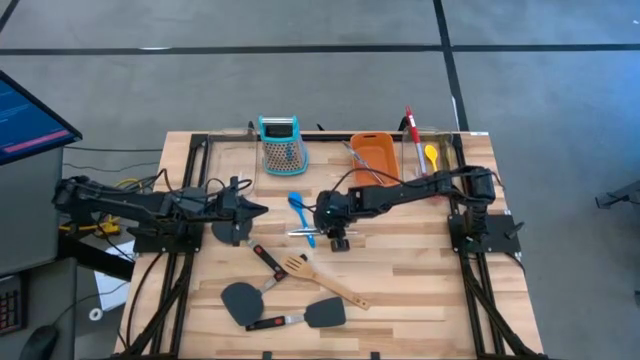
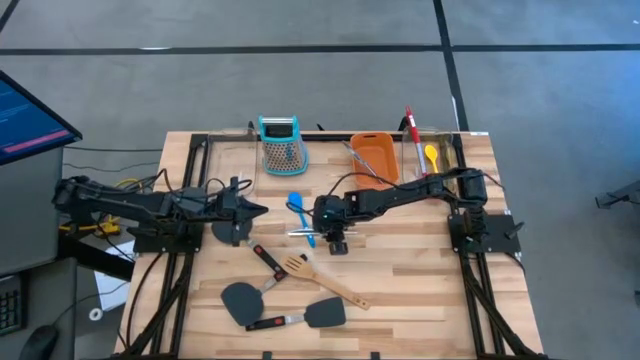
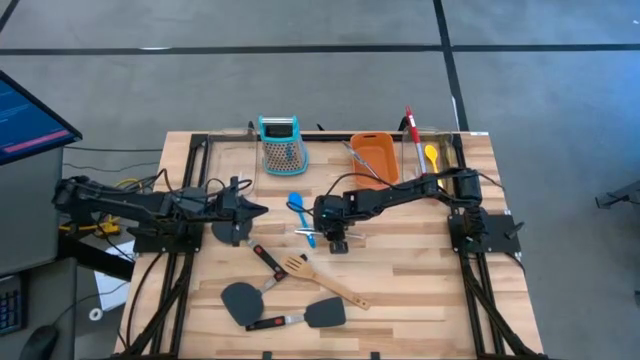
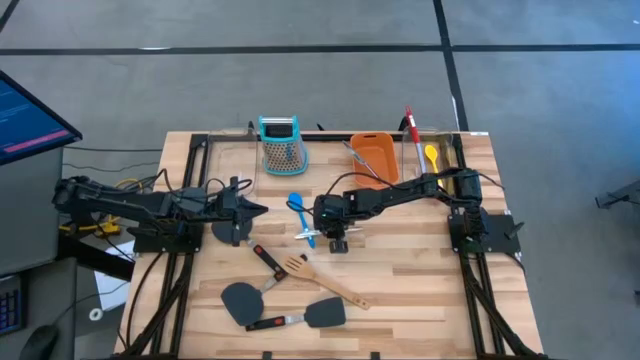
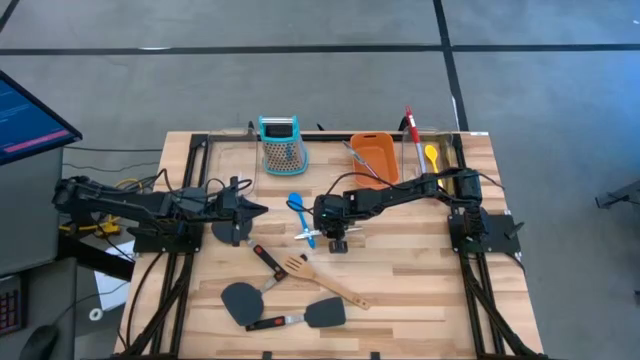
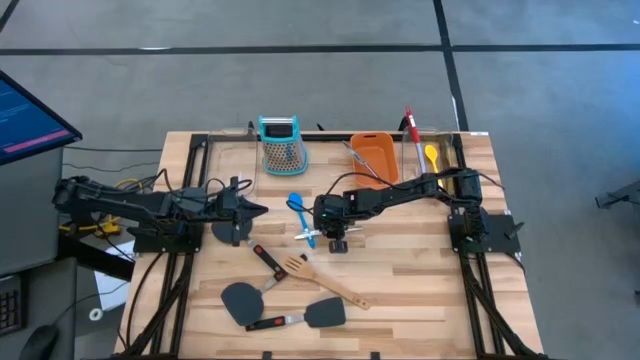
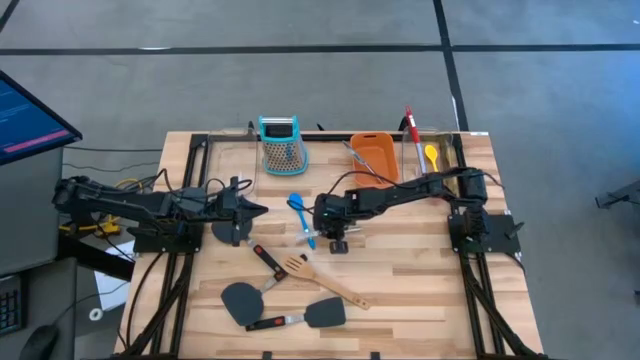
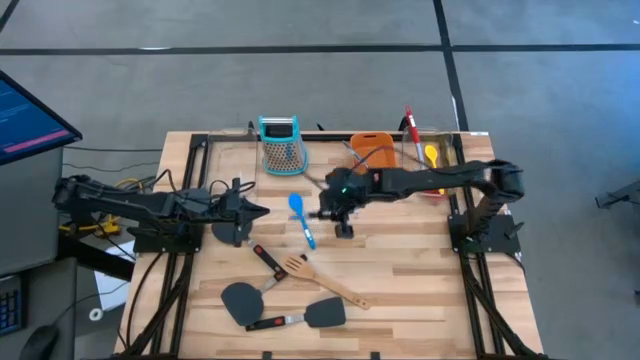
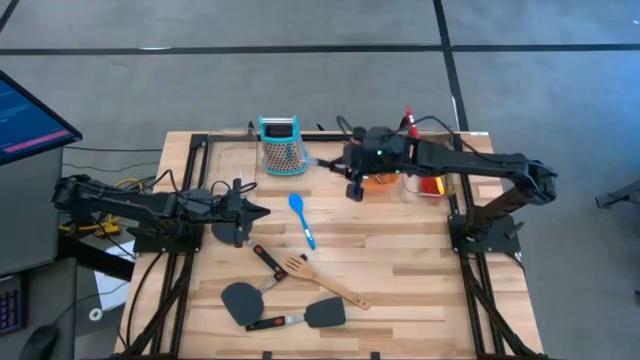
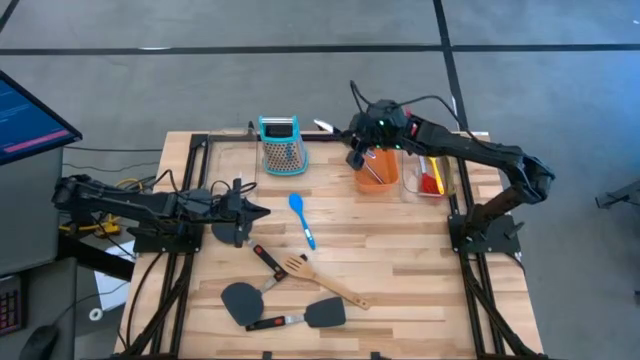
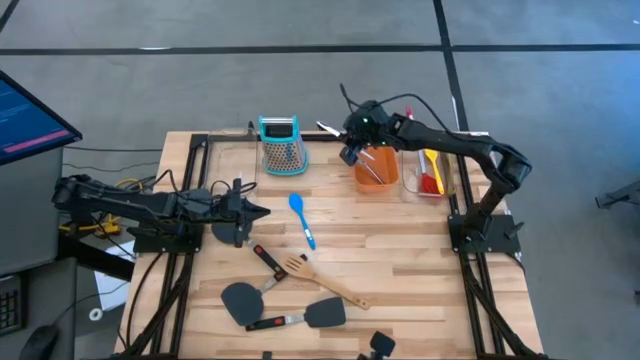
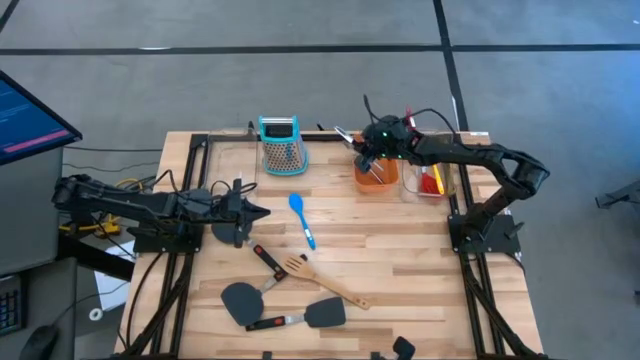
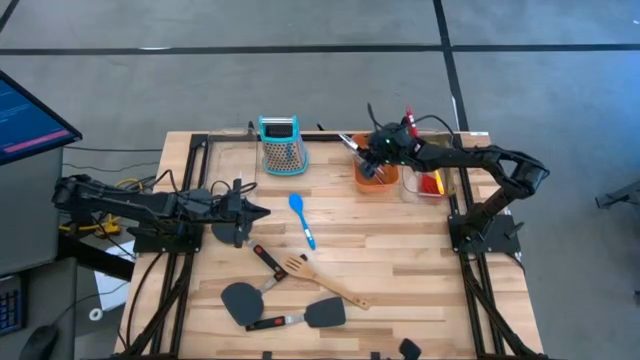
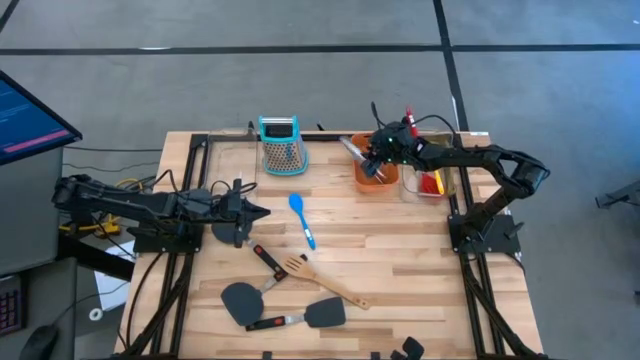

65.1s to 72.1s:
Task: Pick & Place Kitchen Items
Put the silver kitchen knife into the orange bin

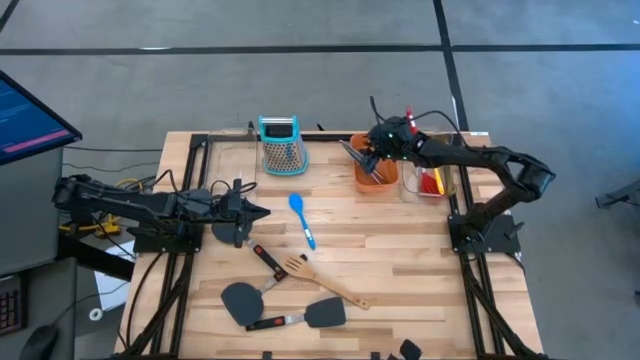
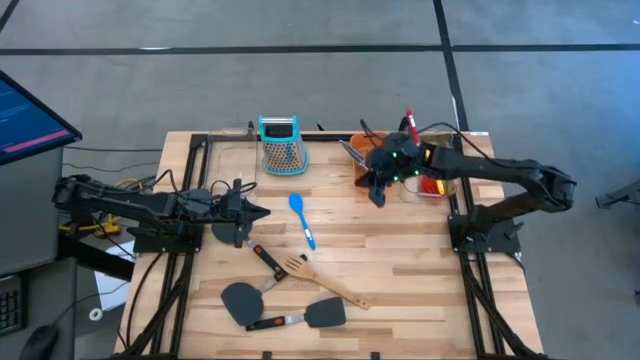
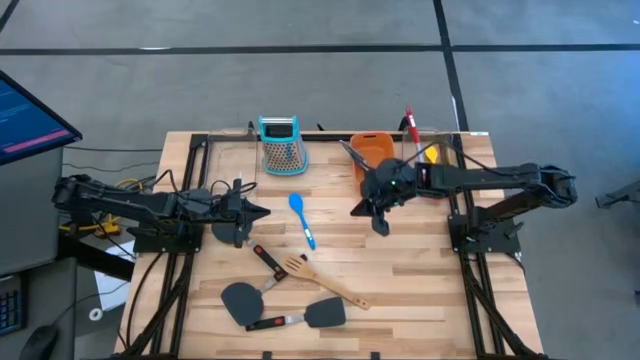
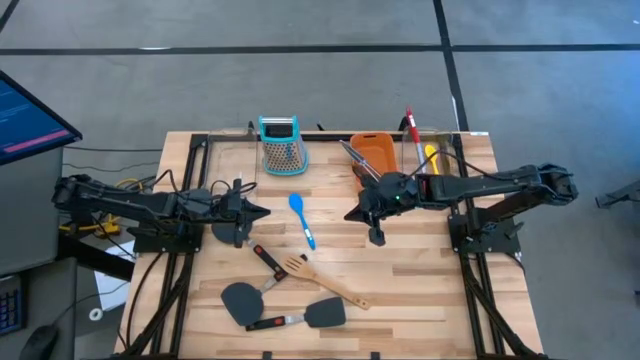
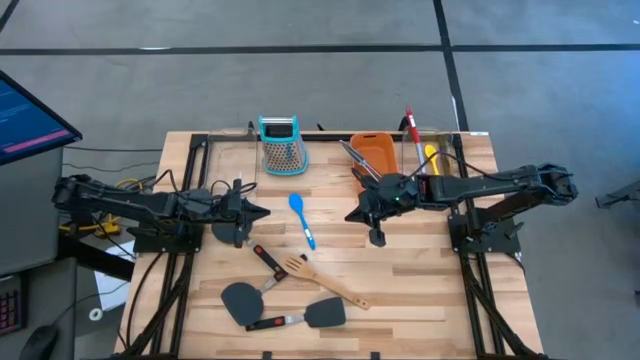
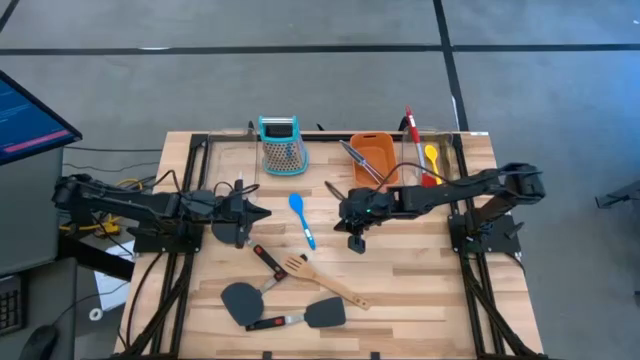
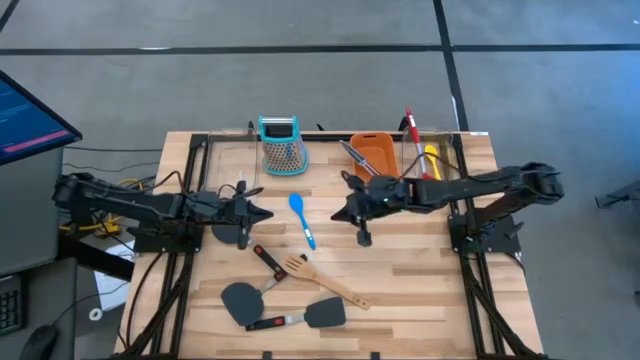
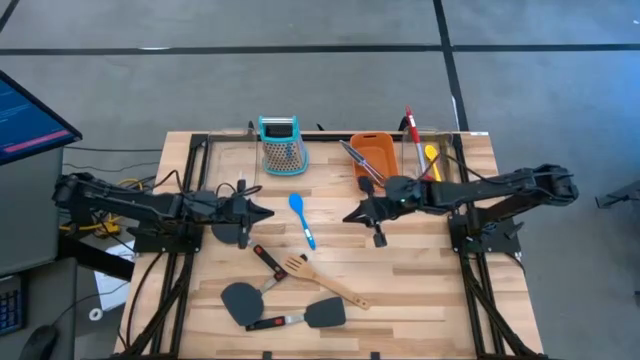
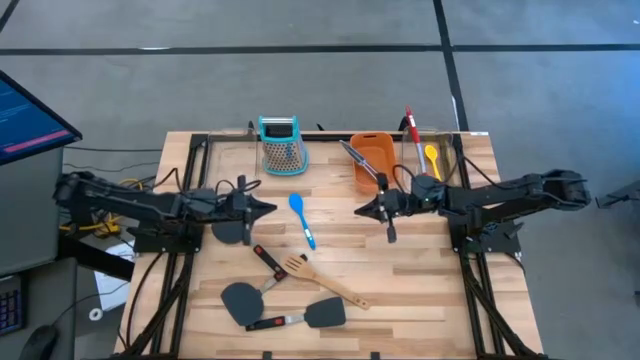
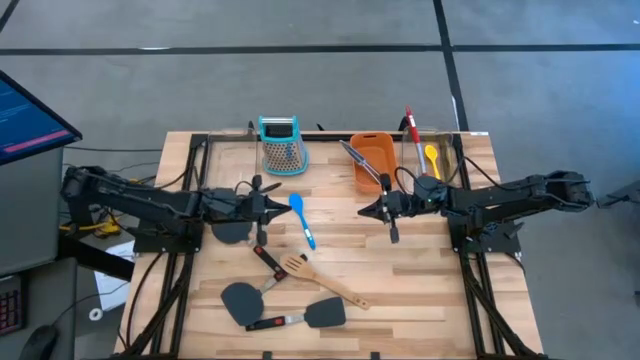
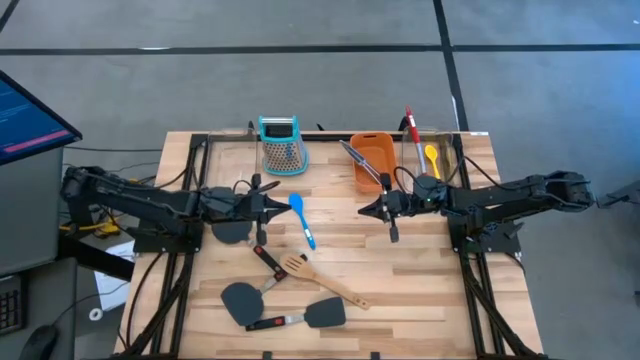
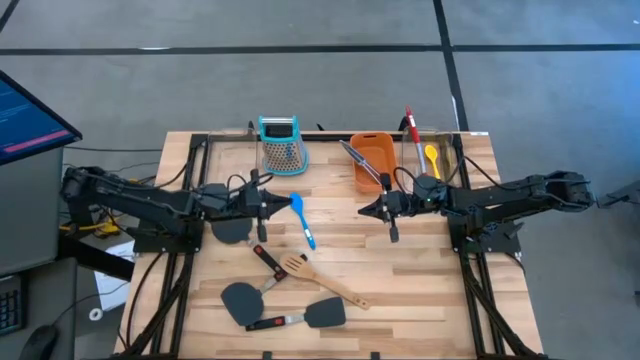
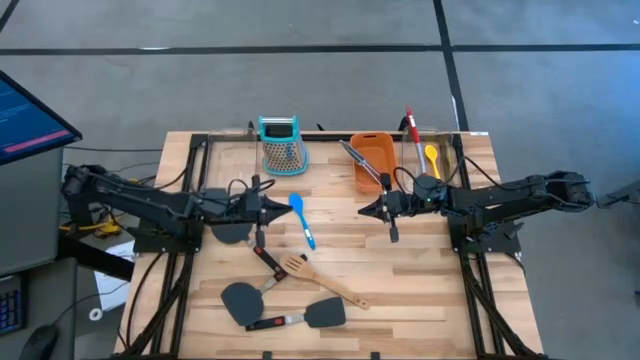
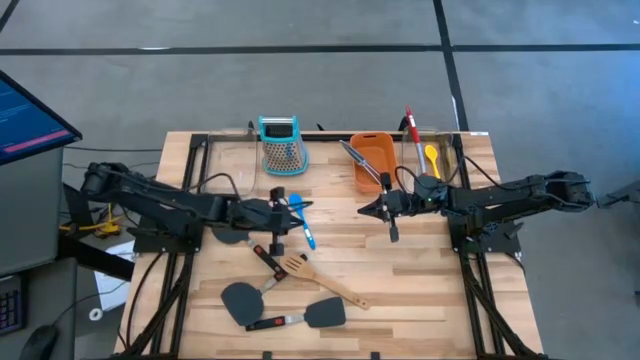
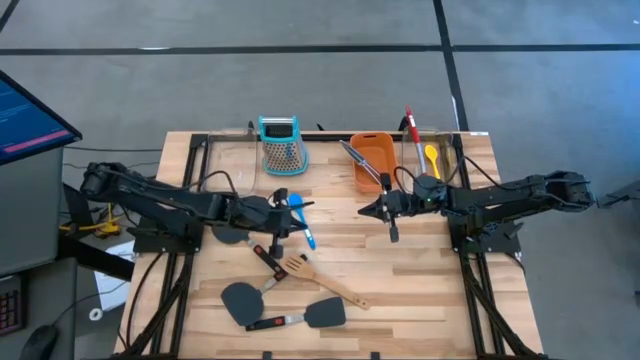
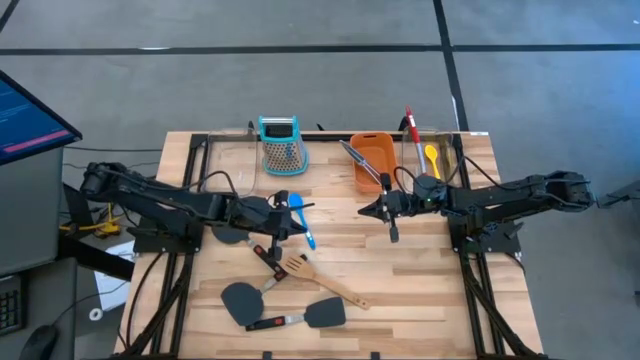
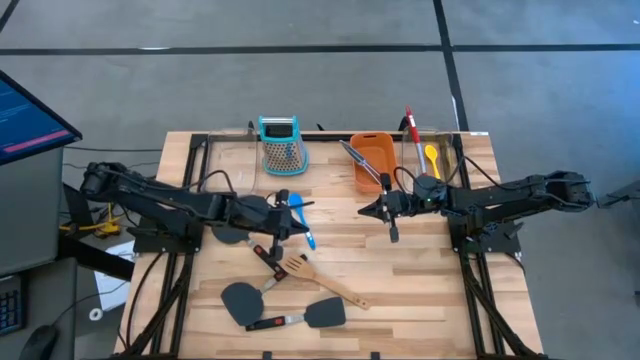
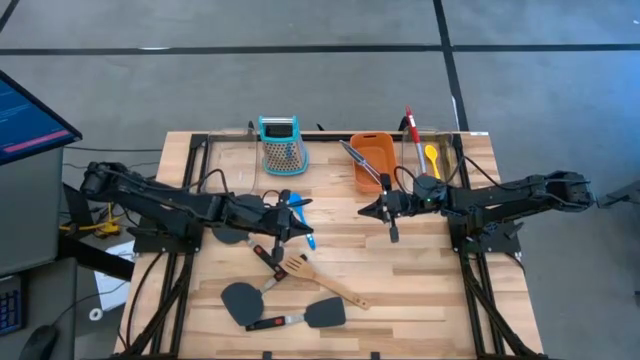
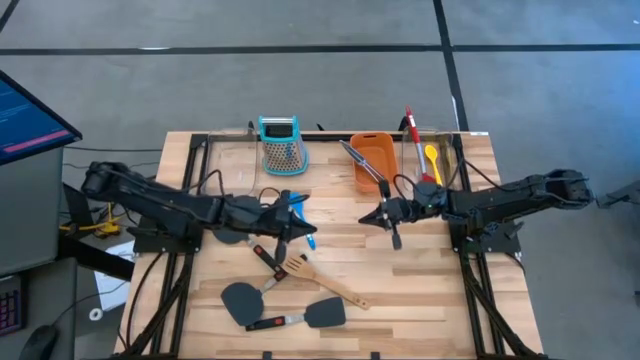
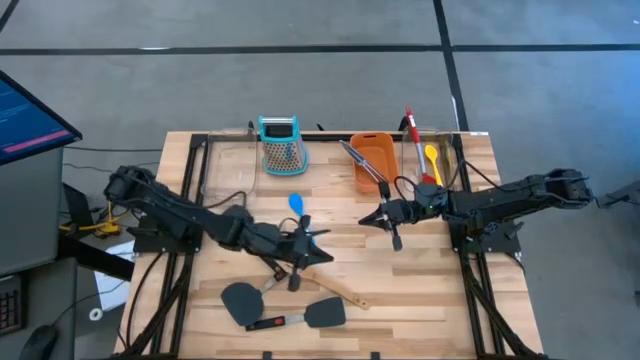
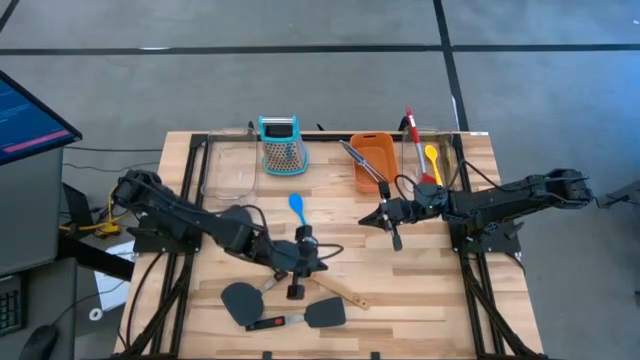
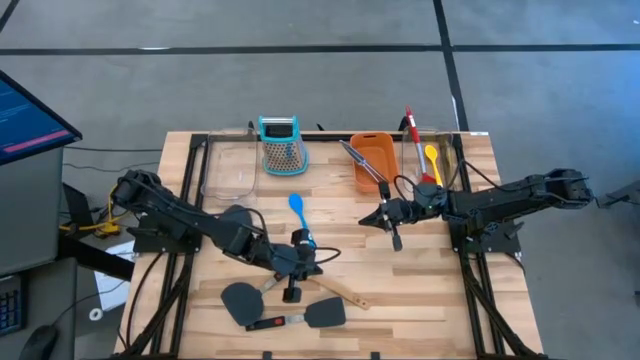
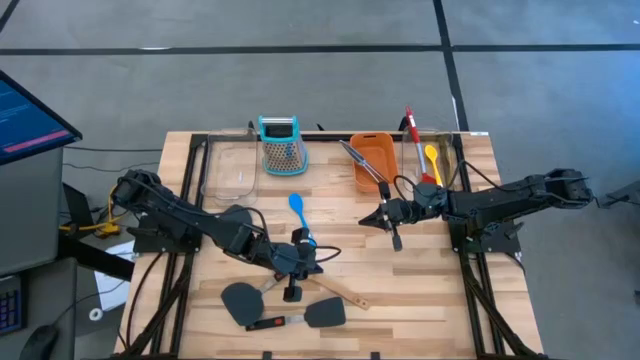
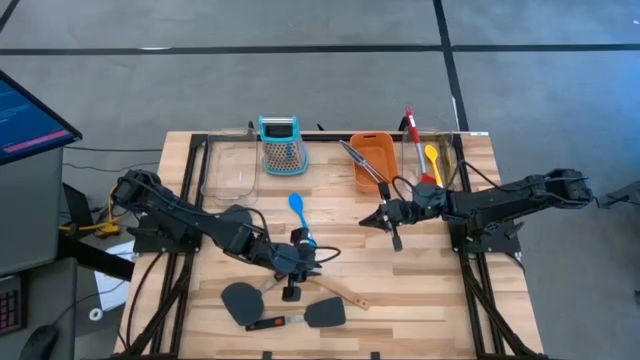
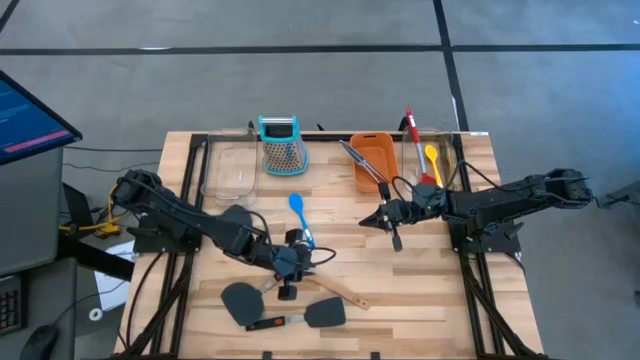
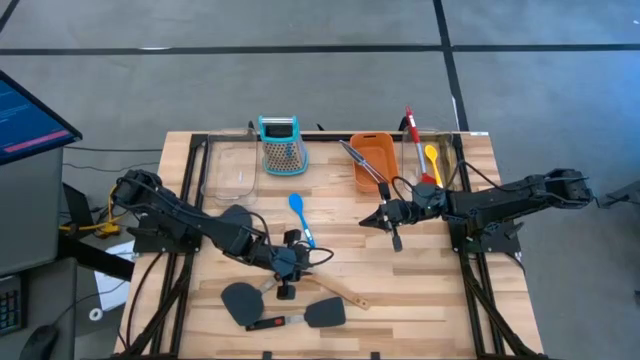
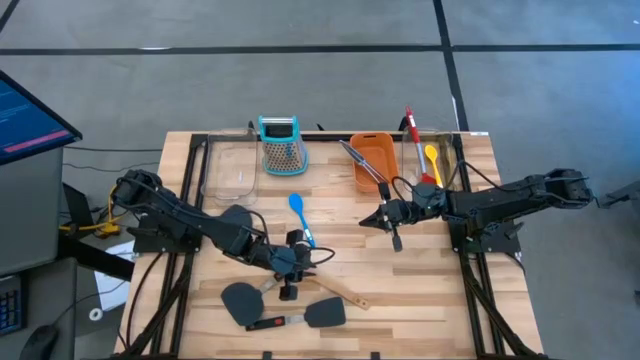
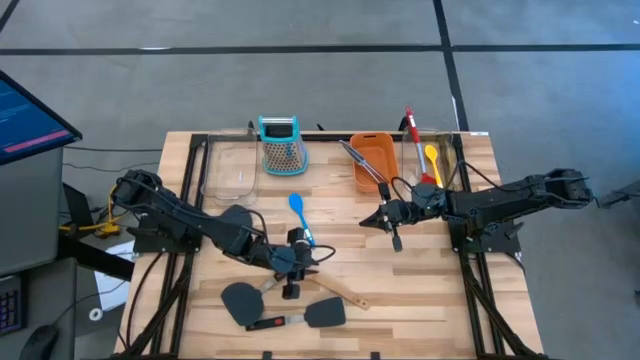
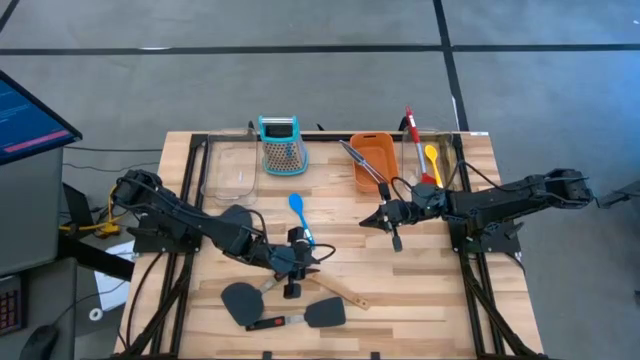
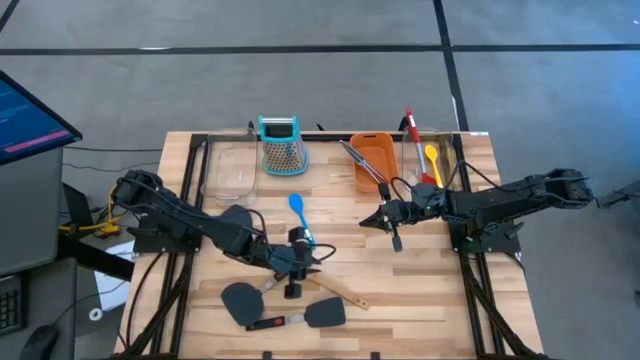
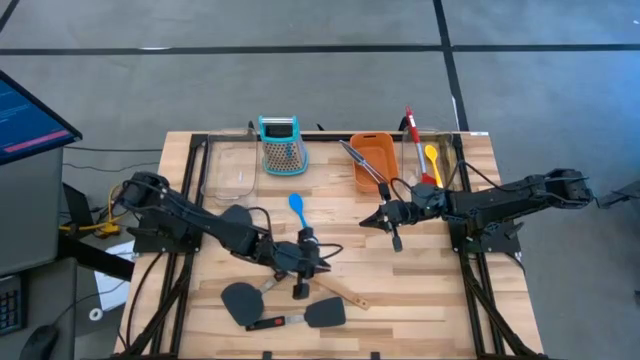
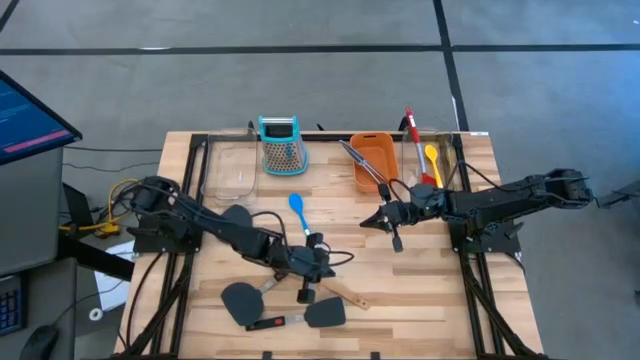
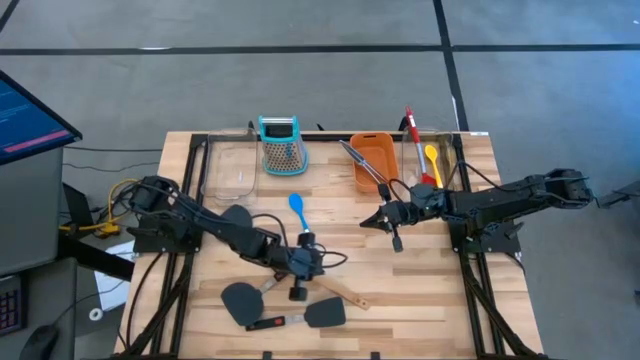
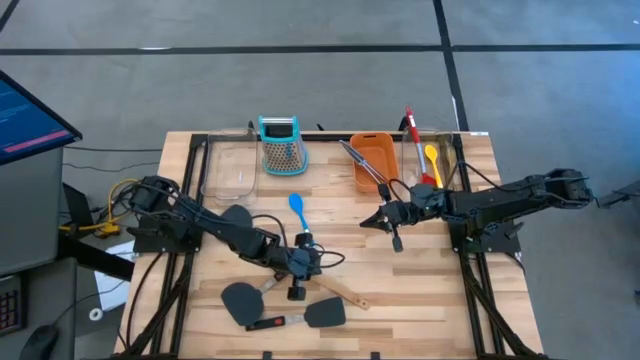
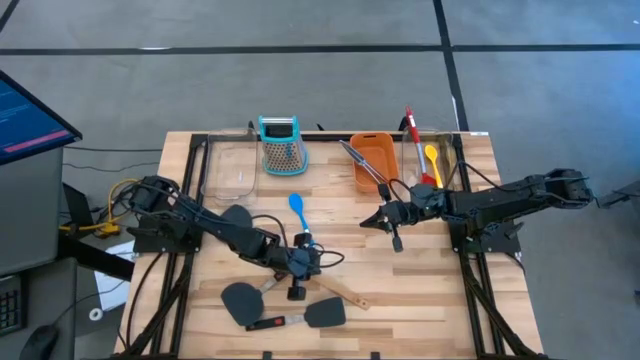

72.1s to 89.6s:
Put the brown spatula into the right transparent bin
